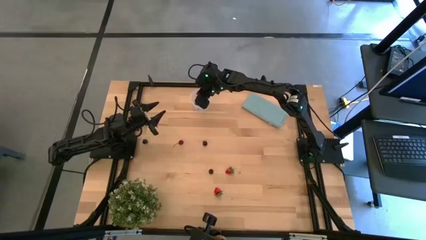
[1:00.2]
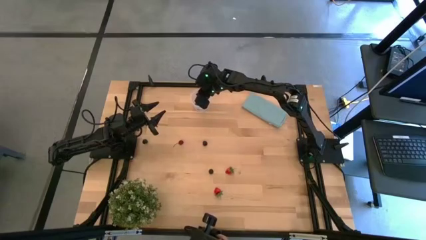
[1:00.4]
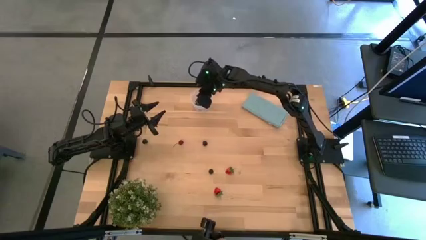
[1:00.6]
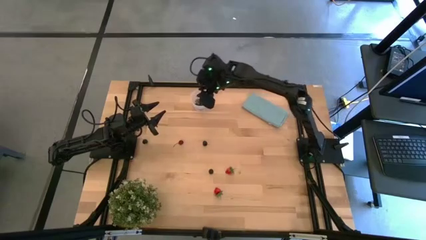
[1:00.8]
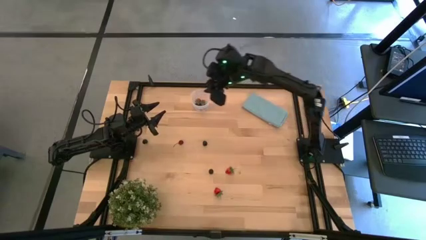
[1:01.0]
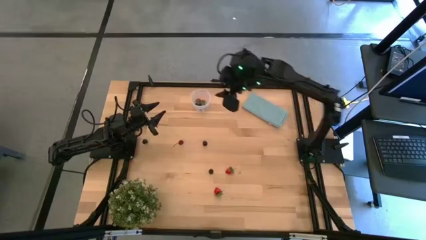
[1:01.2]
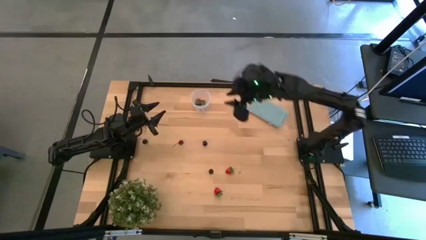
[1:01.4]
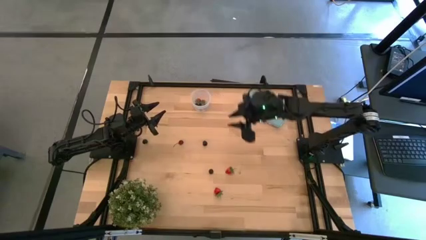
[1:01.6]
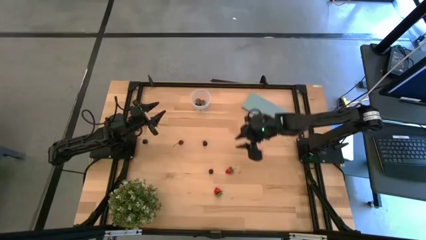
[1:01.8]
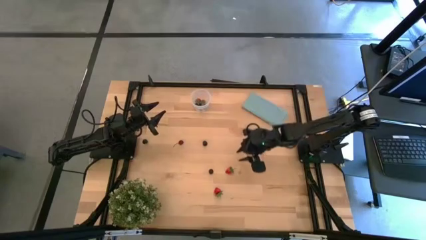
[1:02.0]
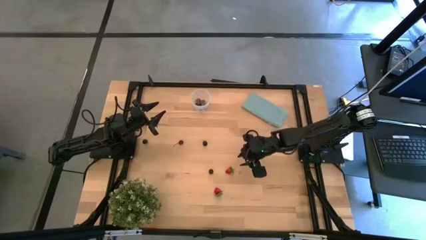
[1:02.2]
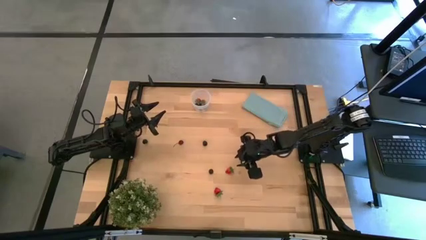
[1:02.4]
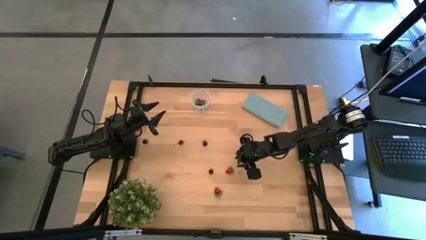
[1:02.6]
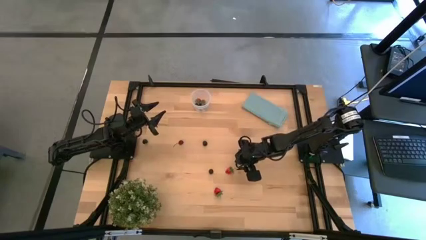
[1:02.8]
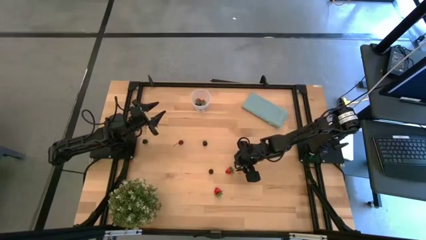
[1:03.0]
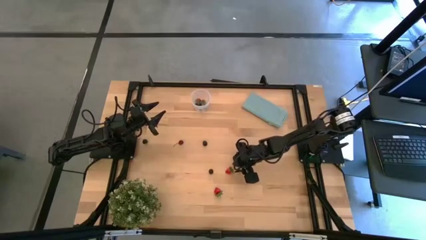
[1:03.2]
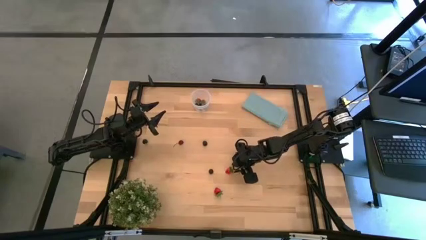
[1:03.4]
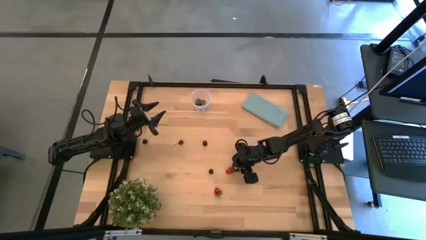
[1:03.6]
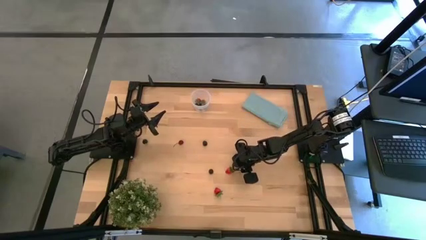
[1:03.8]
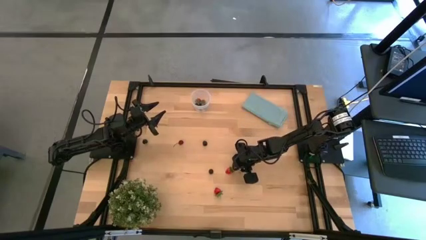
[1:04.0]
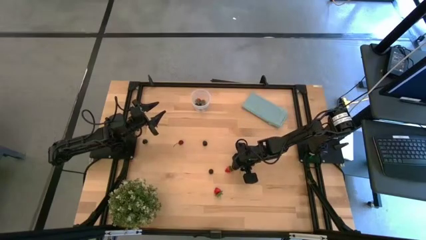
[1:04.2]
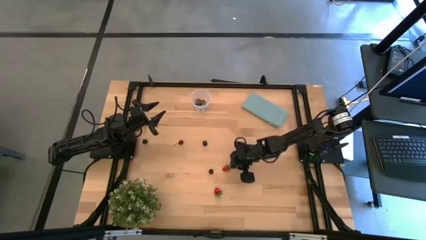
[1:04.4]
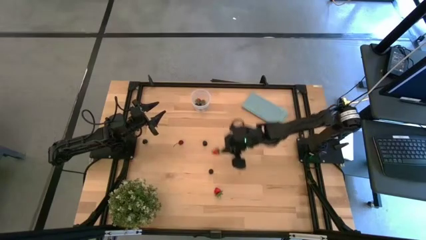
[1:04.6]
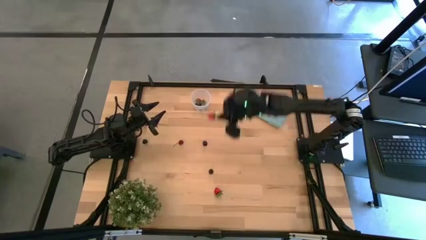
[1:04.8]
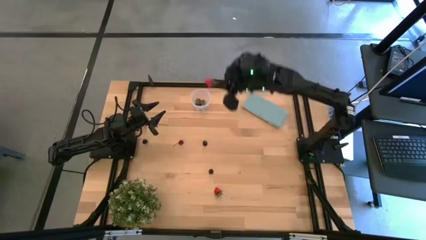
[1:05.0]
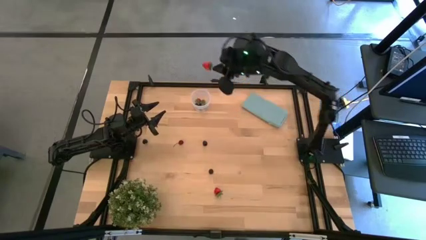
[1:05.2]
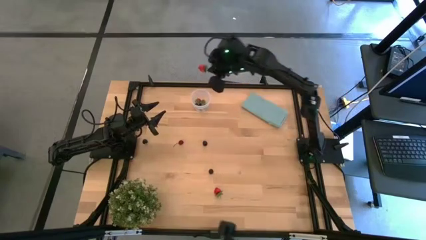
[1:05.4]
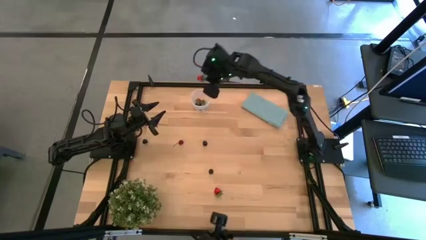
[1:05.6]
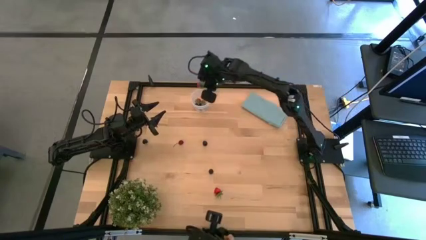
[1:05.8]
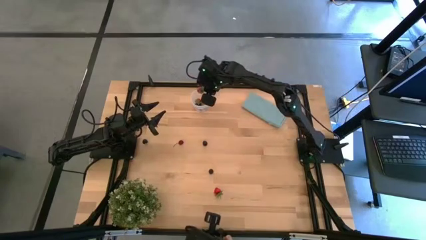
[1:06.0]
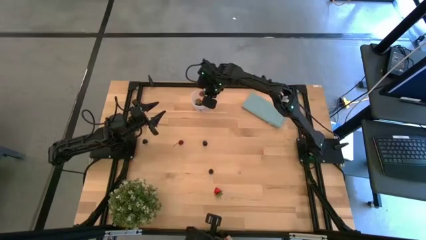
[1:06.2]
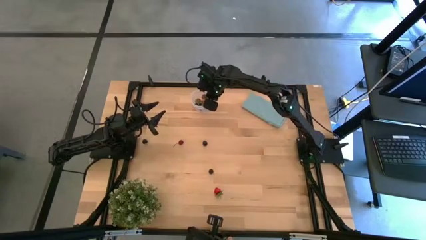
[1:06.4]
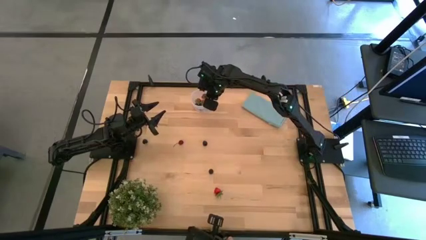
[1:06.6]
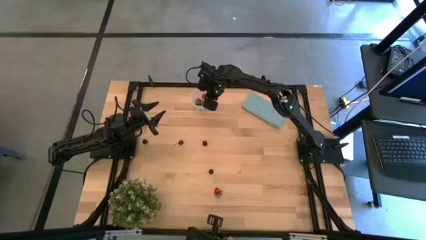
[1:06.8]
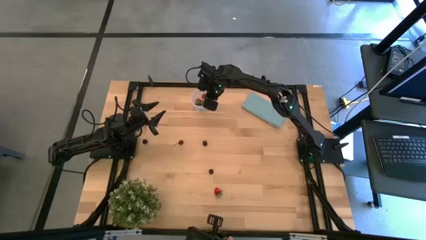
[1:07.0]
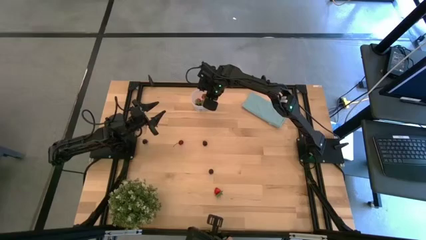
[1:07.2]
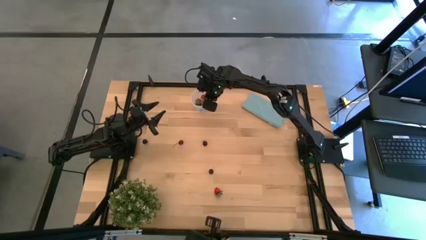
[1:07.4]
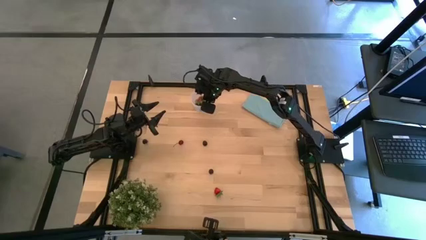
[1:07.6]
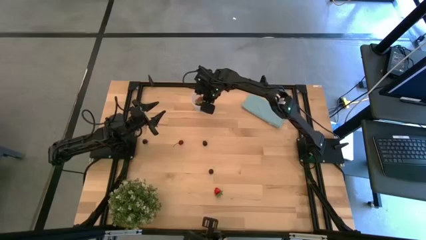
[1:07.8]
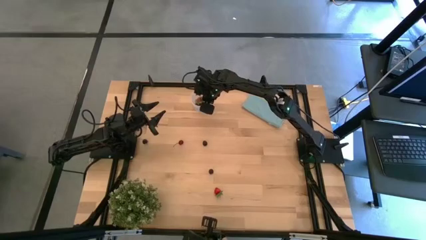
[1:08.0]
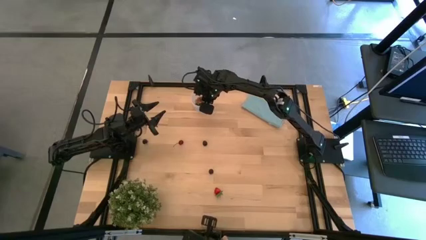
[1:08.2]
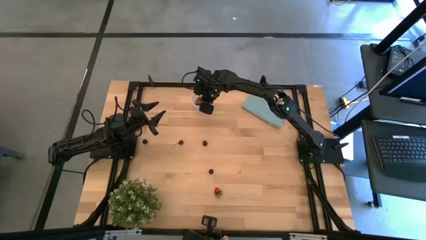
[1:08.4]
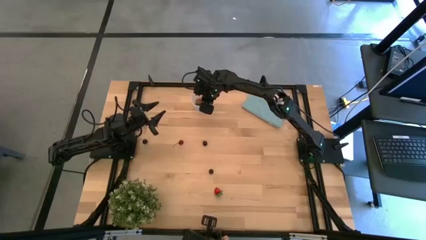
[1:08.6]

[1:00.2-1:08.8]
Task: Pick and placing Produce into tupperware
Put the top red strawberry into the transparent container

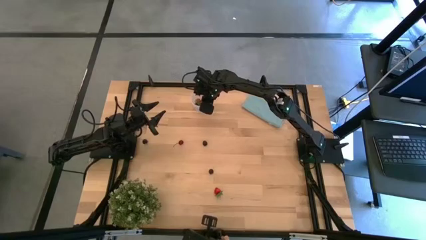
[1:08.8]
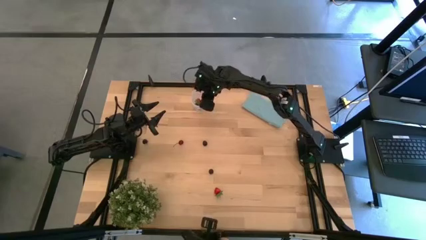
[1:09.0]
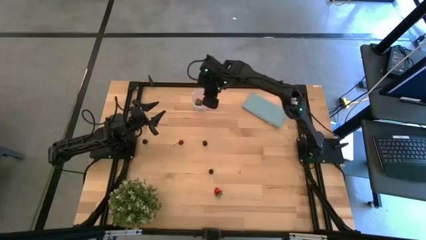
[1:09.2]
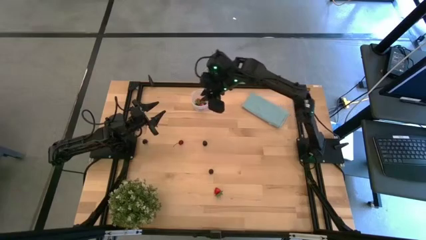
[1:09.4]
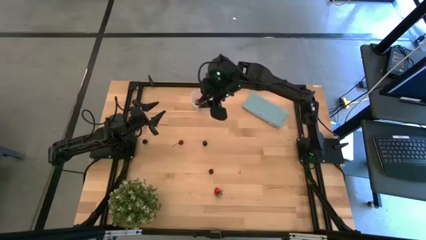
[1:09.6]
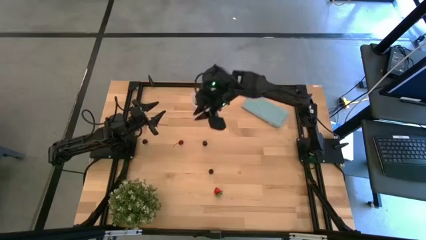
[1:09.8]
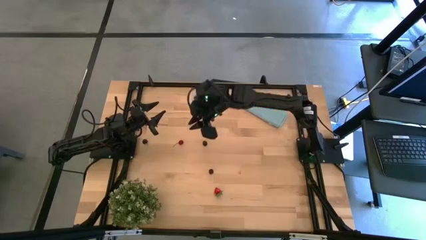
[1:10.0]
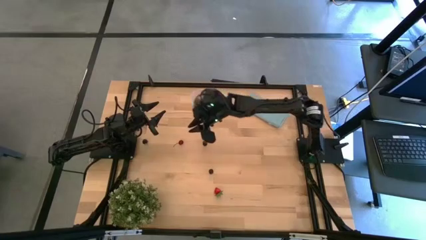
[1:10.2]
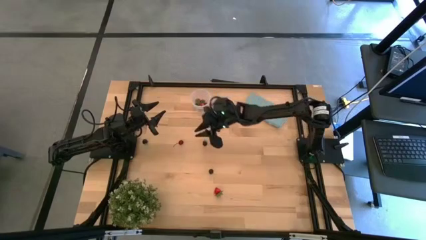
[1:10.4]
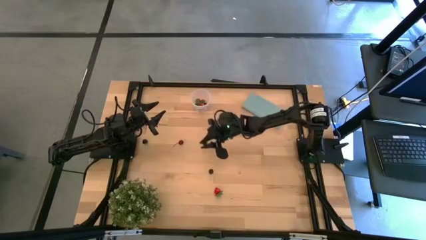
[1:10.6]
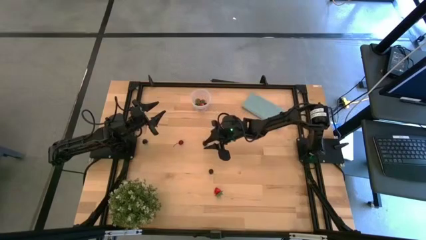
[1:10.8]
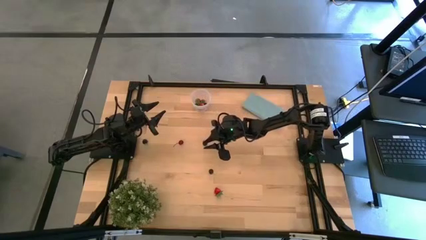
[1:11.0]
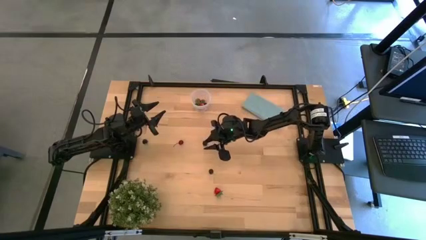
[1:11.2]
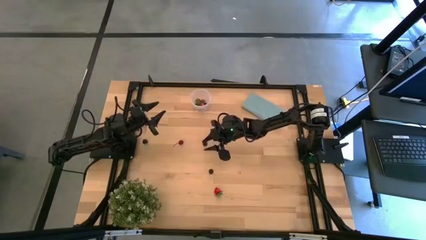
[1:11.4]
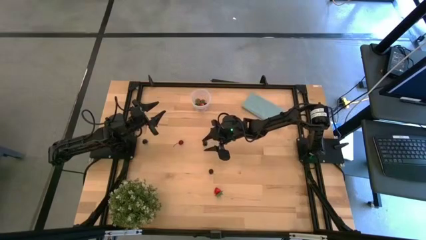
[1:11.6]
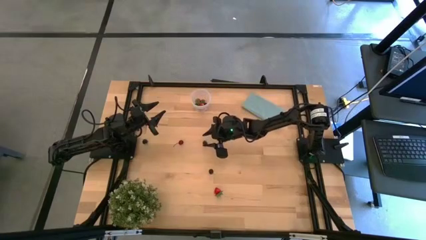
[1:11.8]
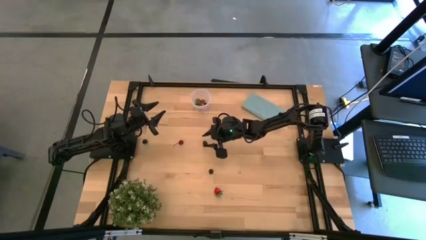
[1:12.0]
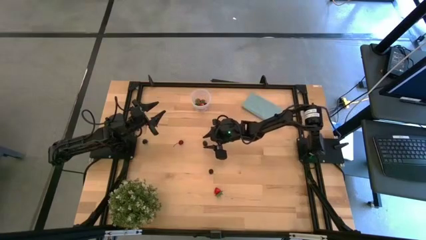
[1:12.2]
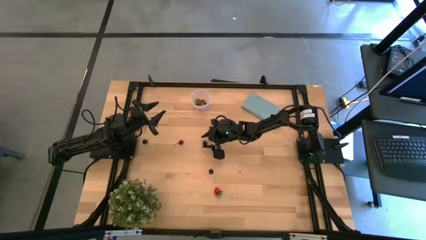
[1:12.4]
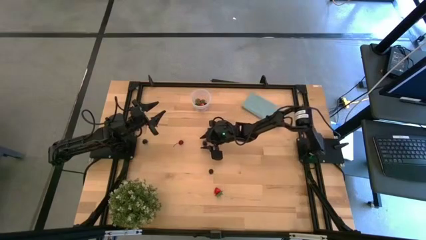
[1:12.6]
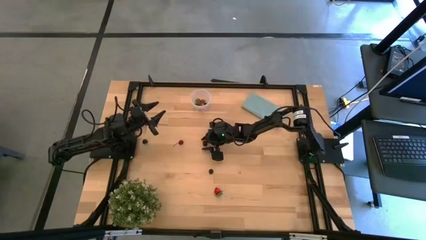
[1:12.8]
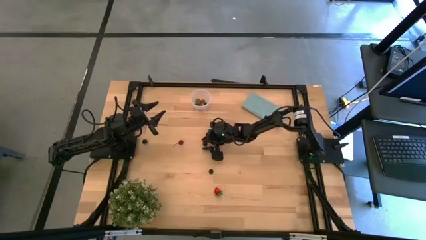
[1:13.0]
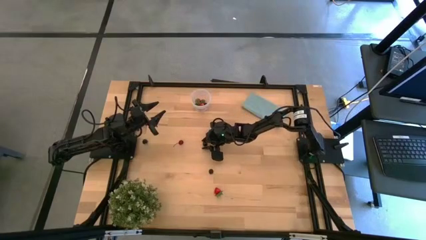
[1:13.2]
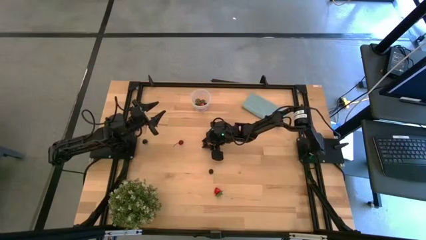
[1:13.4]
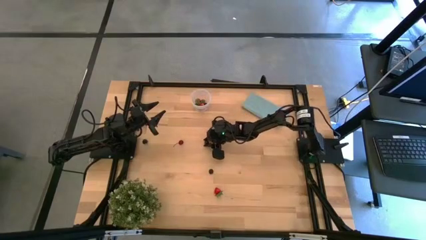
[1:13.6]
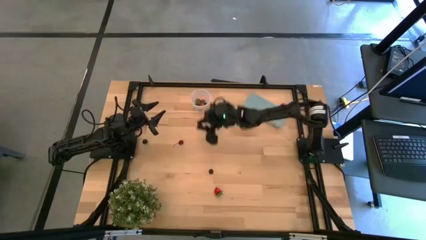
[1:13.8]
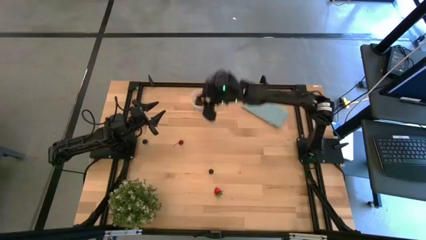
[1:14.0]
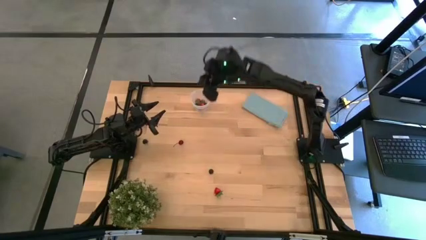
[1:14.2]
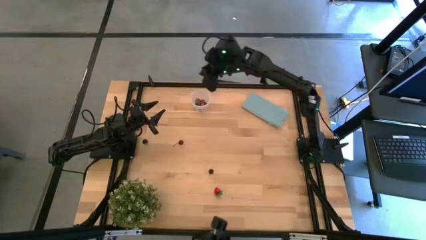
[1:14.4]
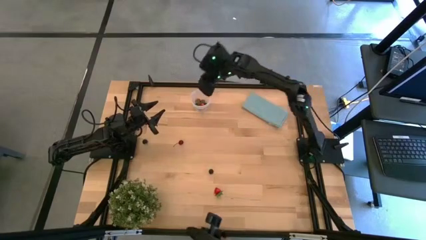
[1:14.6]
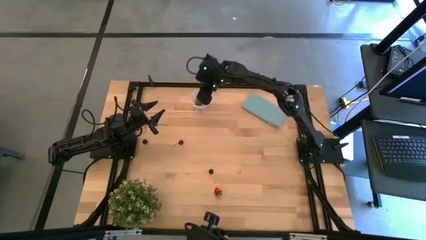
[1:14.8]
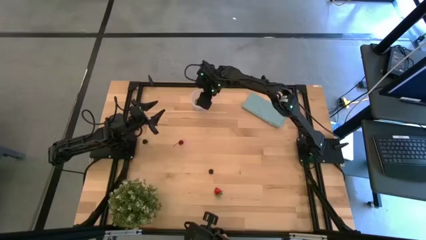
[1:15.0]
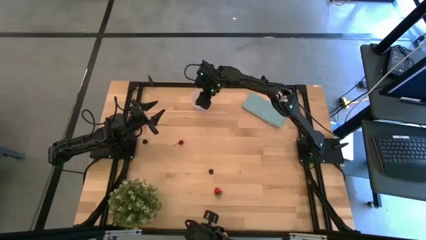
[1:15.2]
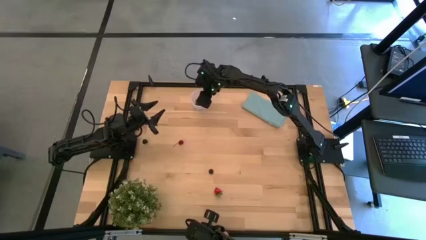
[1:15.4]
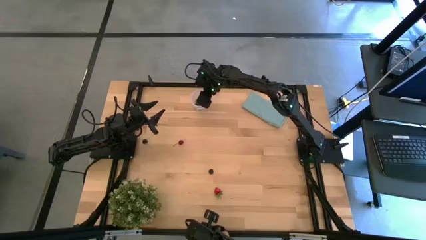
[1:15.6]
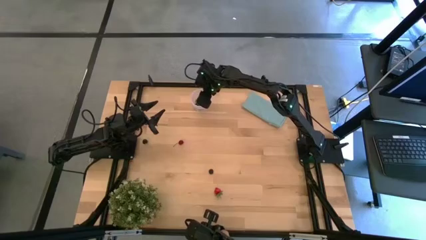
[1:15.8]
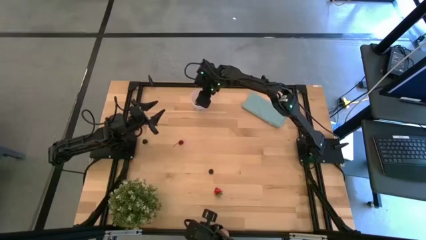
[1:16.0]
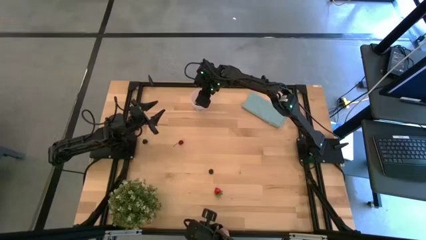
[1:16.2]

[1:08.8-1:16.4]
Put the top black raspberry into the transparent container
